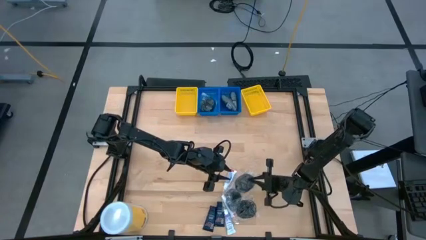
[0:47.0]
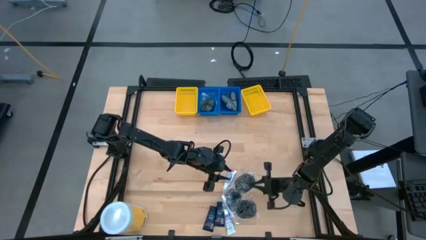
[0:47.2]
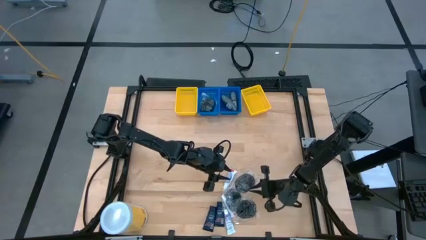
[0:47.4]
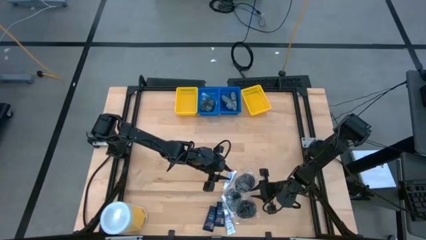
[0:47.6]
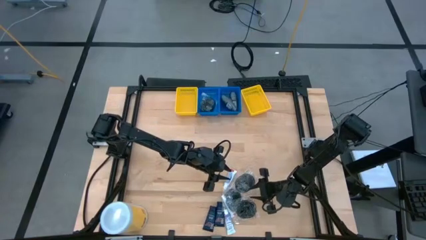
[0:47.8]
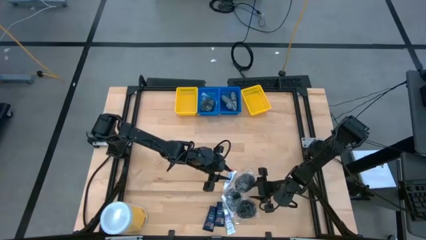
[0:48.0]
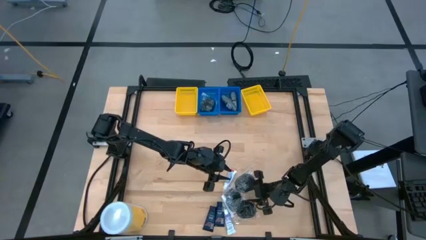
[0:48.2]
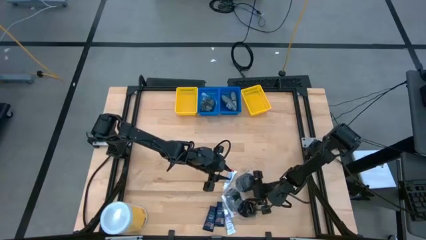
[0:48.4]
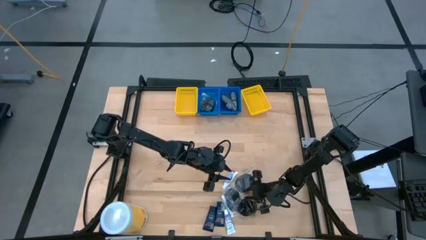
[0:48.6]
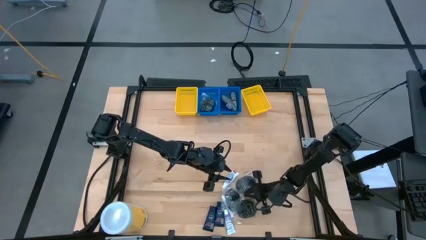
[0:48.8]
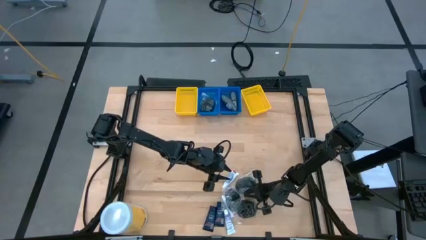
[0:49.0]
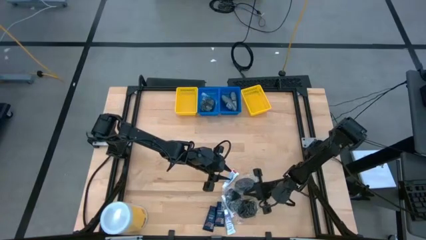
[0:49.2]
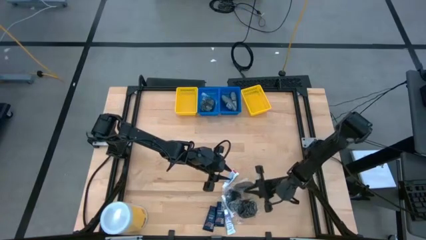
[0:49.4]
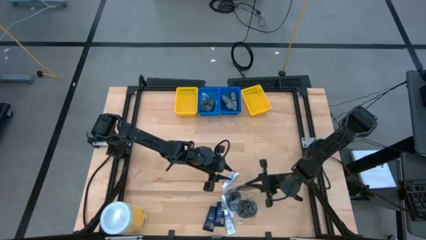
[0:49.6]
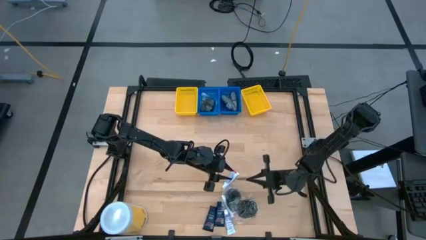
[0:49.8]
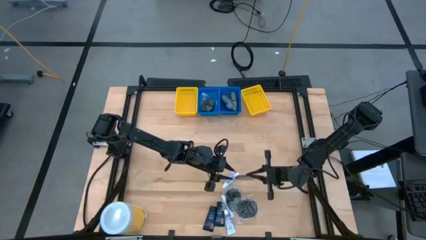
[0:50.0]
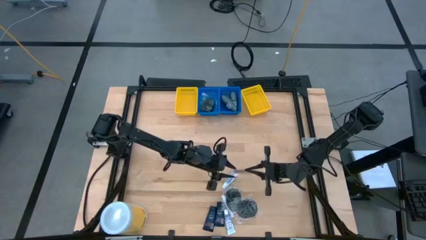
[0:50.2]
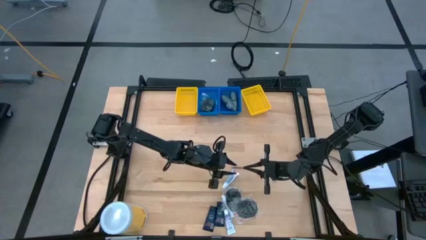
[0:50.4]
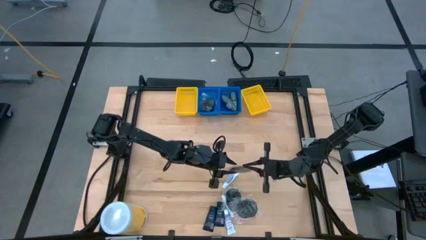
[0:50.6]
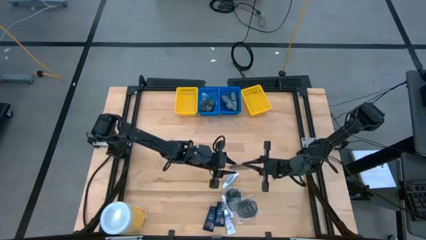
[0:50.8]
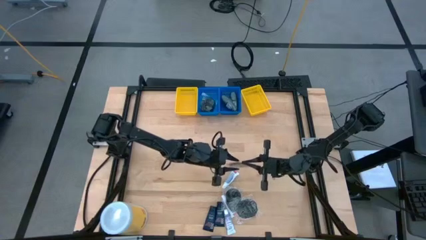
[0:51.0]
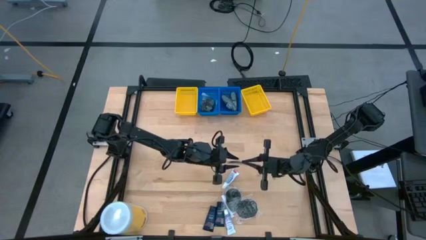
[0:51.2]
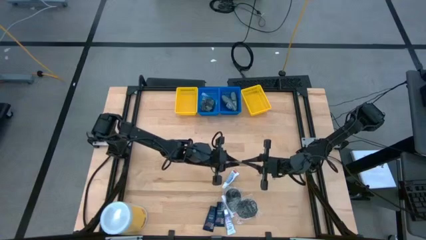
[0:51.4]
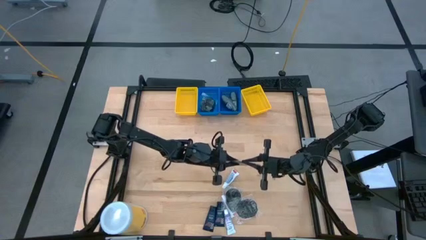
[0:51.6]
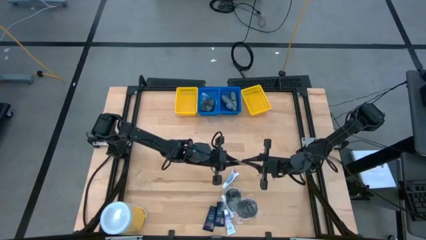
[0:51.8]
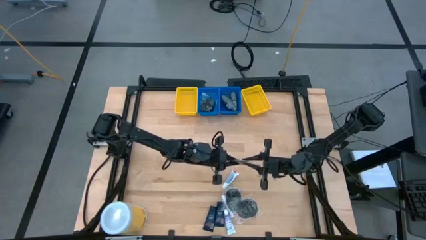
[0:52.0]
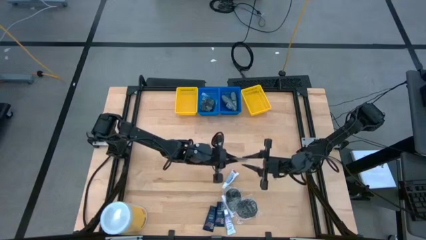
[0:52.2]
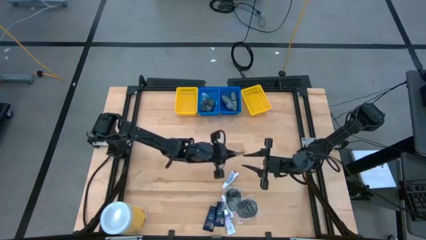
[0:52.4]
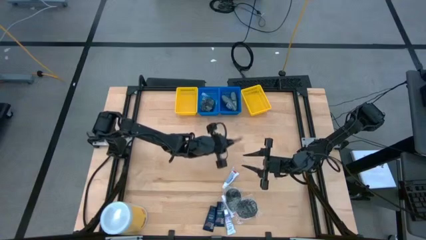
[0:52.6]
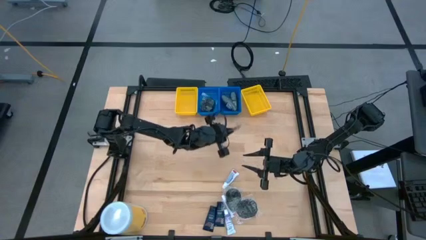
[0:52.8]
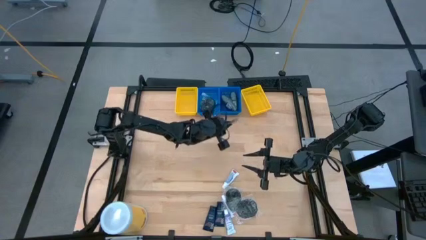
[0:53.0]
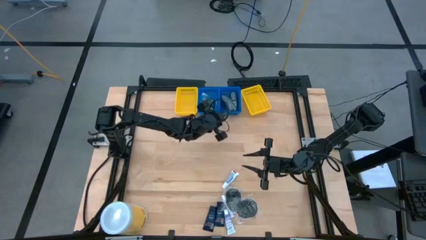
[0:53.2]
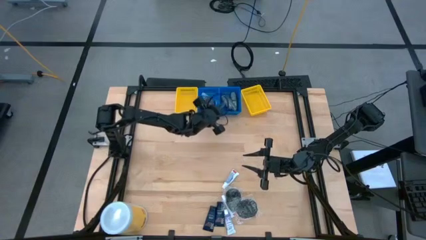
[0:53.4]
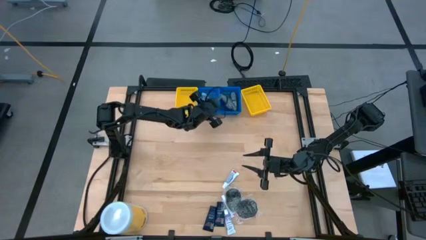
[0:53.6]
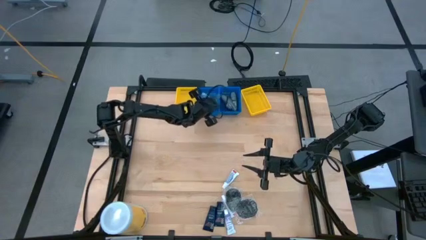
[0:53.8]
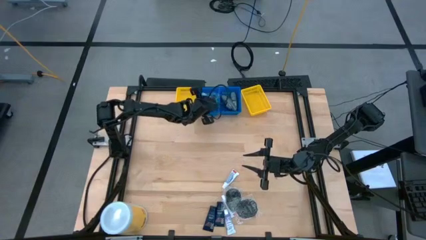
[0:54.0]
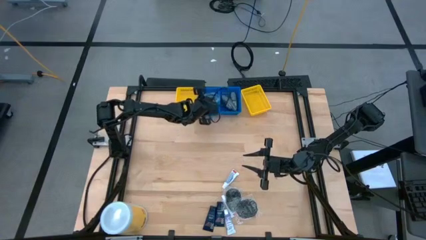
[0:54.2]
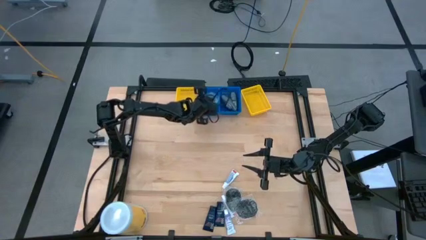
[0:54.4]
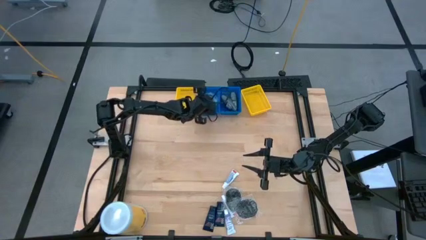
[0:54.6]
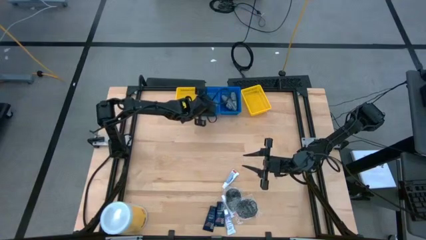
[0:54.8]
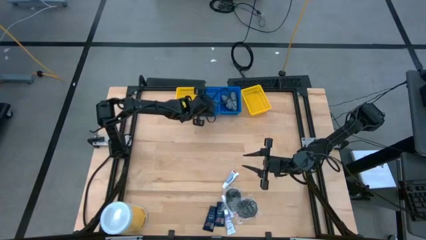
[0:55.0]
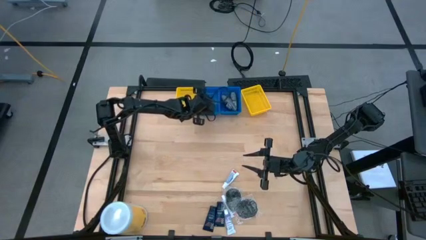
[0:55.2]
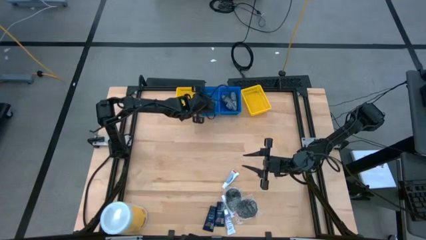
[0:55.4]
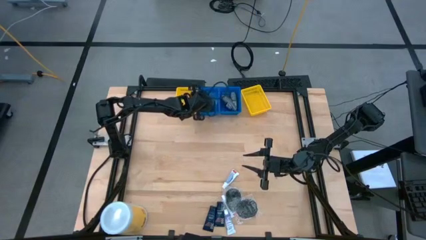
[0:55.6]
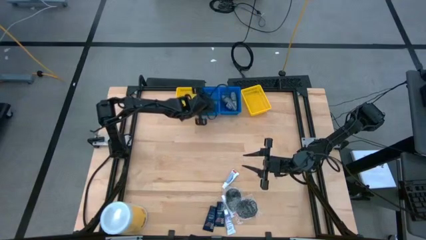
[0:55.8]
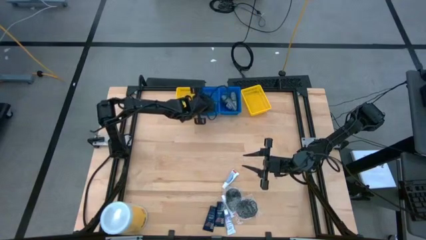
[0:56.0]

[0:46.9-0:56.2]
Task: Pick & Place Travel size toiletries
Put the hairbrush into the left blue bin

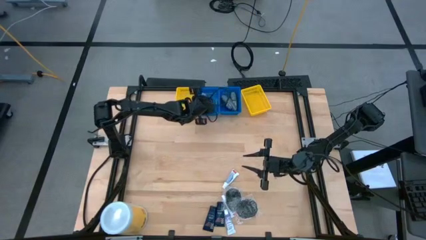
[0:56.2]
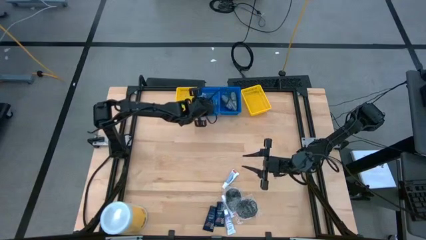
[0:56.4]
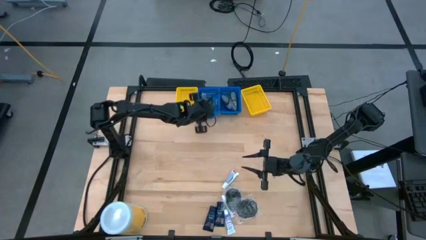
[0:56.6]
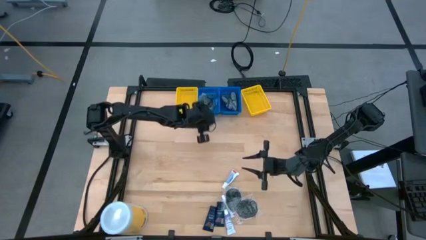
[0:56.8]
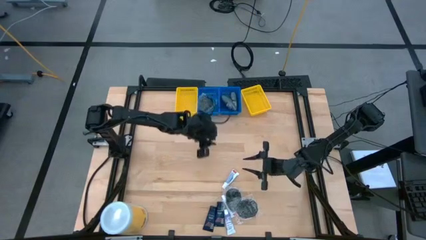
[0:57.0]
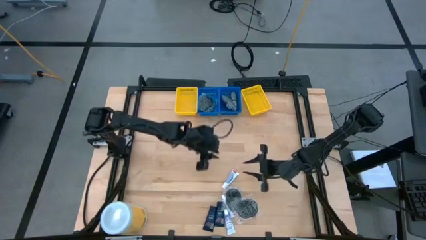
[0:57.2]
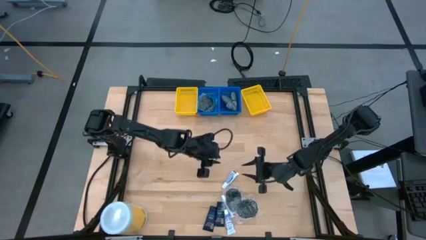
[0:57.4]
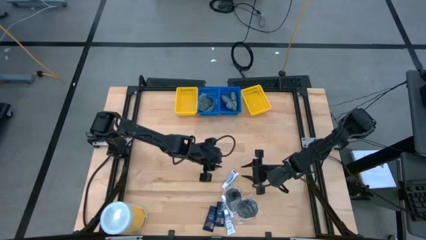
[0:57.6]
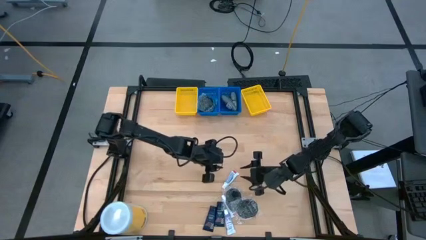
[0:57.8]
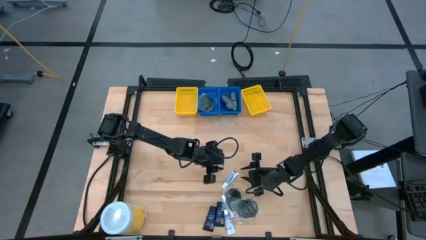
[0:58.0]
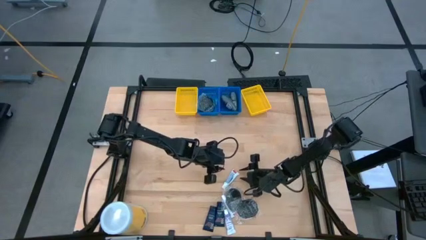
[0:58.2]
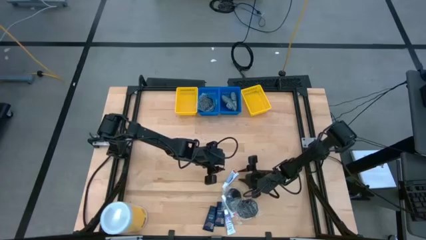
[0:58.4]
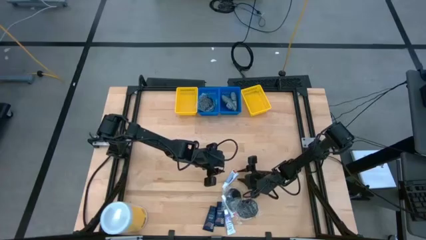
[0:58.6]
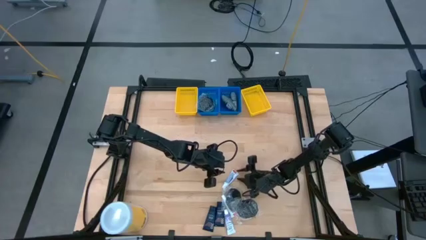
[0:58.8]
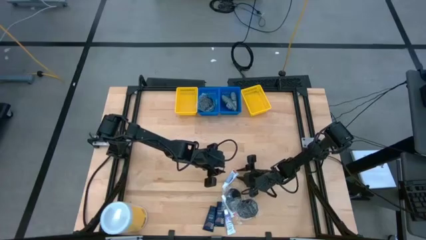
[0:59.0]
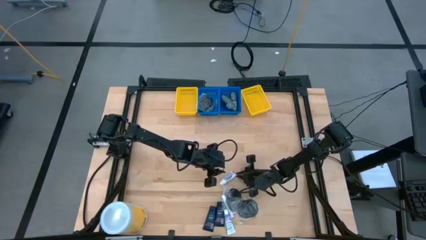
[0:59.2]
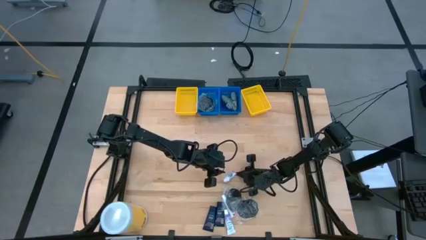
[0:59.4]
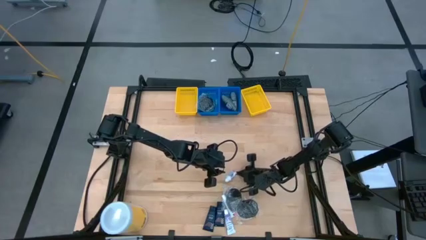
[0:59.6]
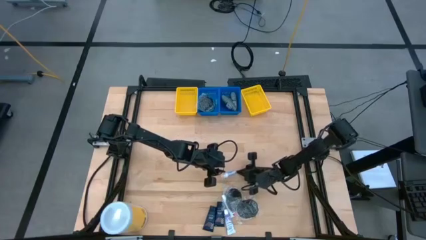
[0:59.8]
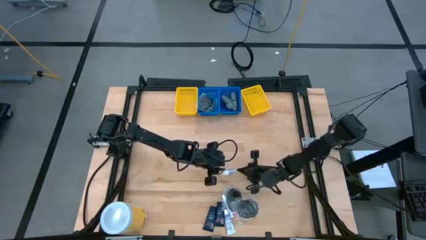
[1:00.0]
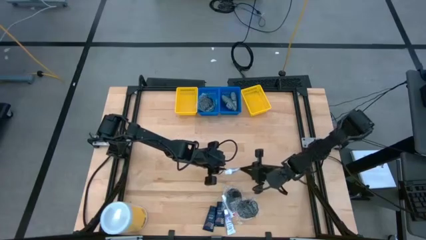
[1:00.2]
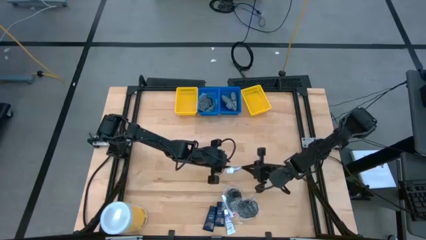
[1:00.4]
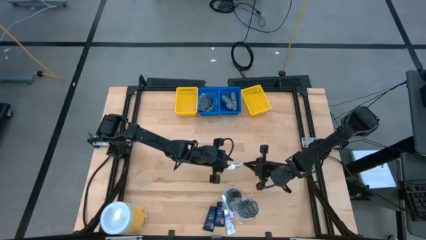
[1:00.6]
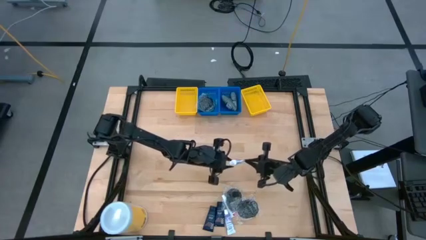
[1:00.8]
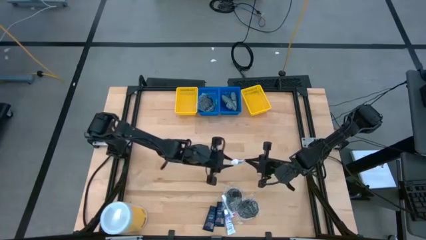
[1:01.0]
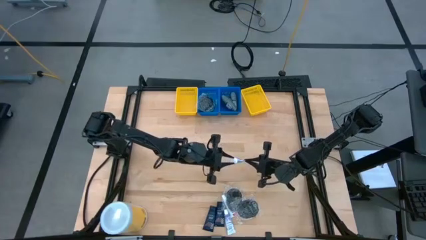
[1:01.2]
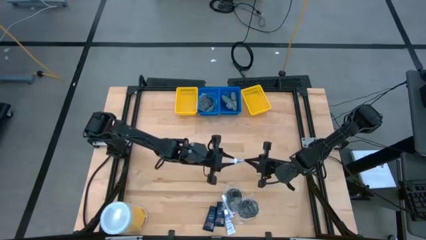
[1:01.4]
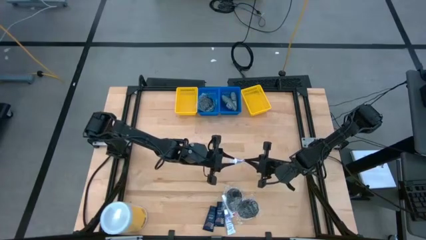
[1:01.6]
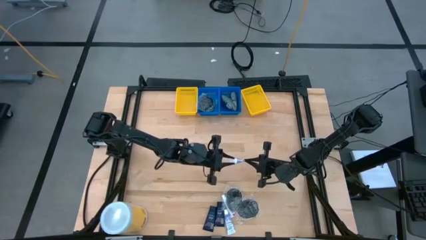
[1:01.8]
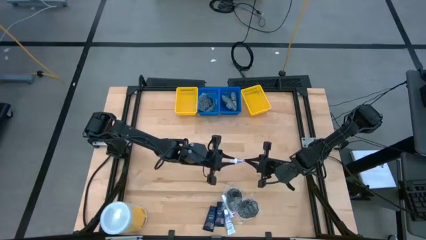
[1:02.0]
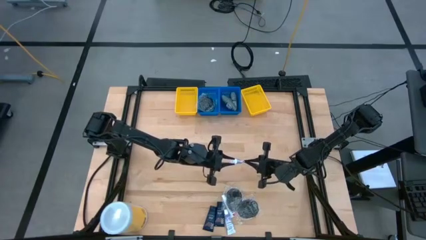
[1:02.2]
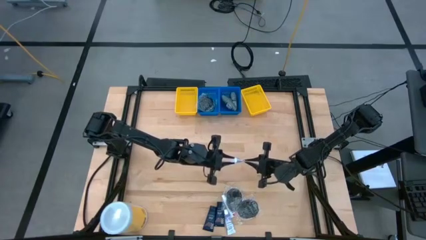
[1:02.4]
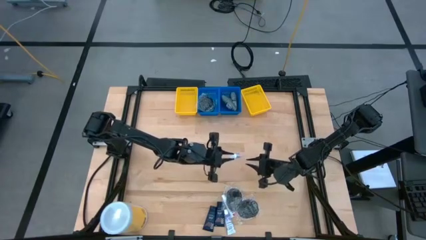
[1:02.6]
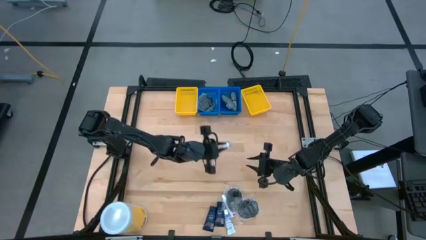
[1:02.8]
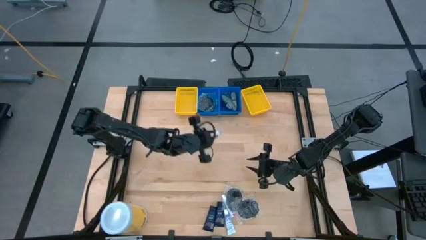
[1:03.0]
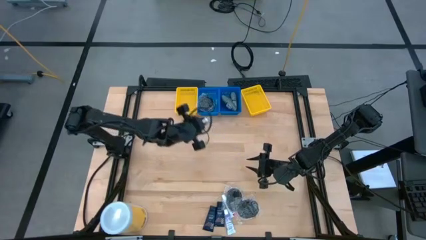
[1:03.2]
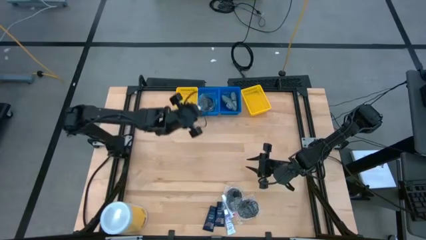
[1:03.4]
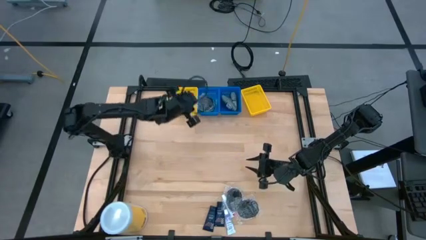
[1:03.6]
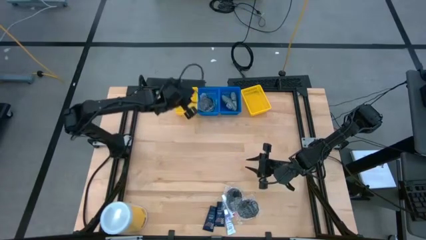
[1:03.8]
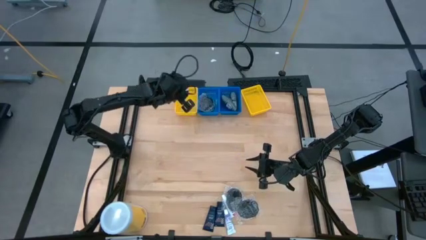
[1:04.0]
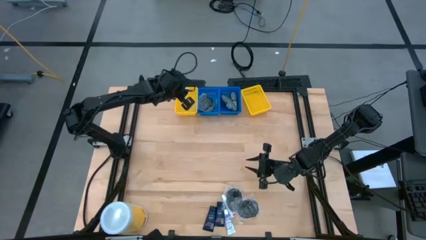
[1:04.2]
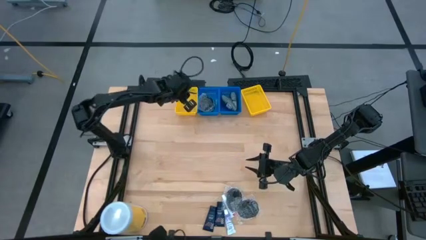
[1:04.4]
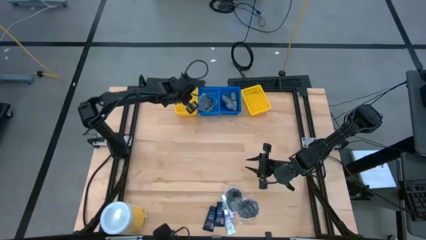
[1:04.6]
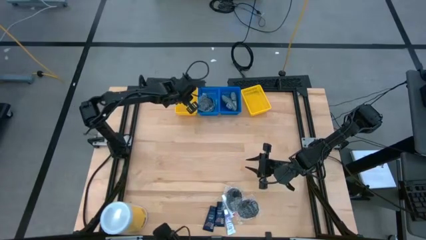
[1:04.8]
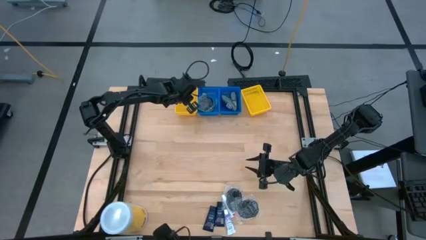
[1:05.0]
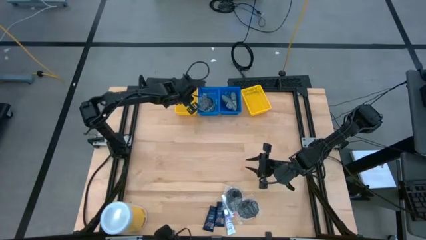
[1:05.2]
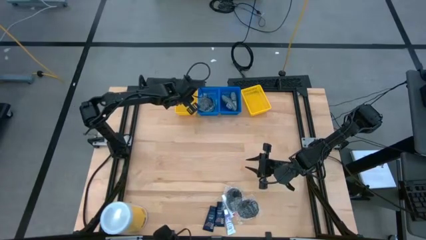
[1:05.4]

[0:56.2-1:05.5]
Put the top toothpaste into the left yellow bin
